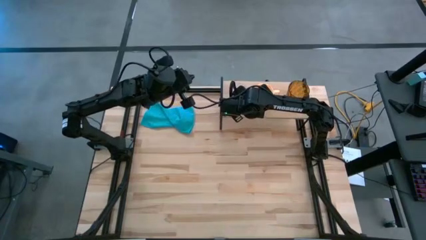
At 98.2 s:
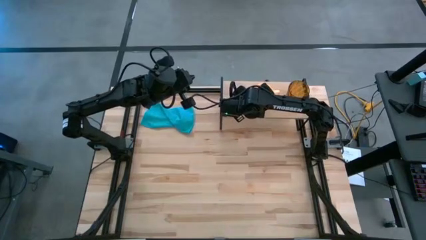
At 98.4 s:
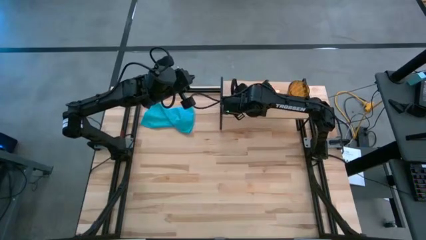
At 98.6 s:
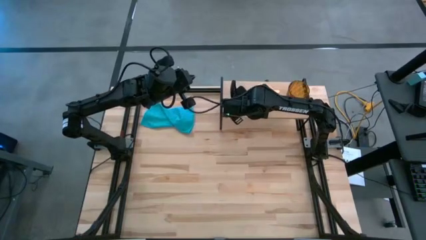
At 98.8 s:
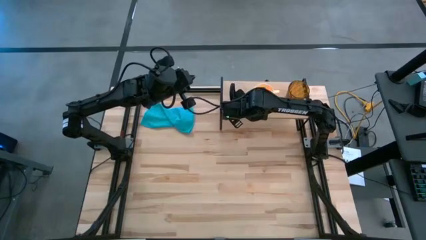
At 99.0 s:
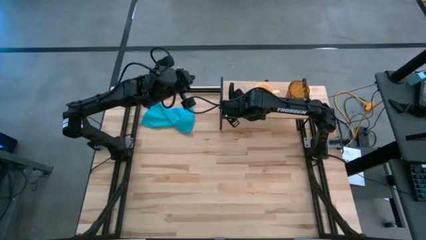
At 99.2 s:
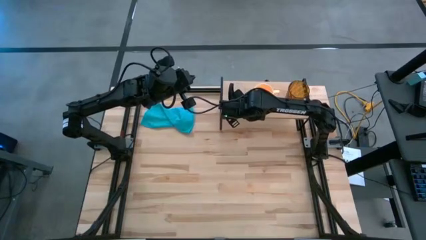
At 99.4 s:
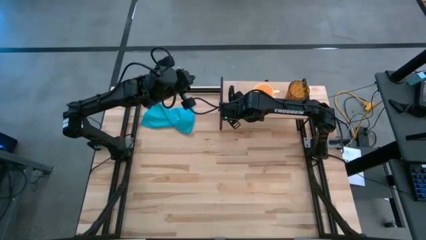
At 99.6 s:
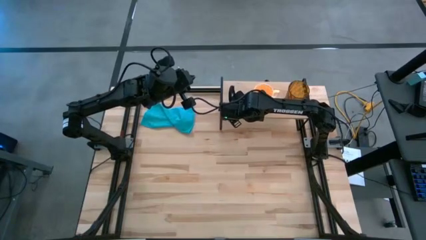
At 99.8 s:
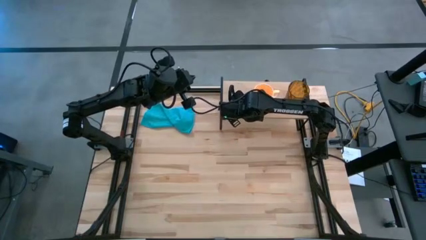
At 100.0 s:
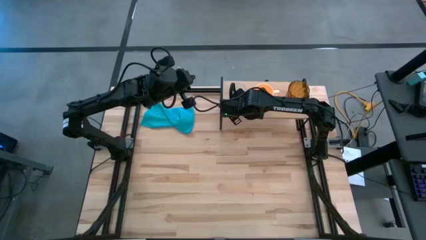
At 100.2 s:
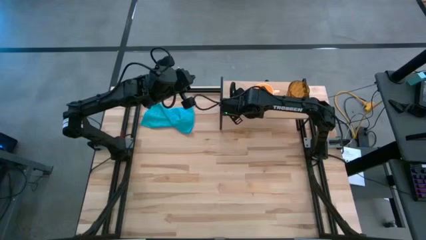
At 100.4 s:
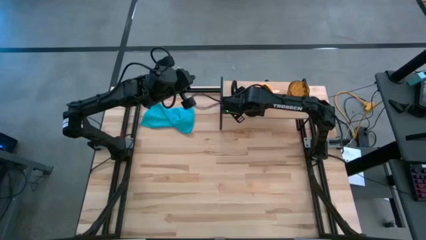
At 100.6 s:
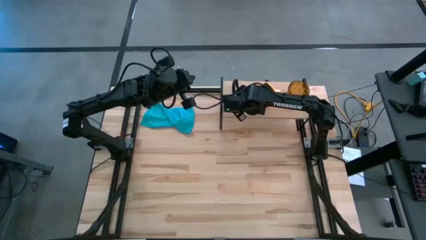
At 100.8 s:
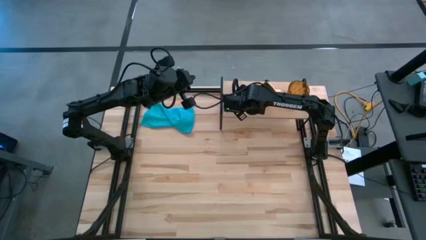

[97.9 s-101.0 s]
Task: Stack small to large cups/mugs on shelf
Adjust the yellow mug on the shelf

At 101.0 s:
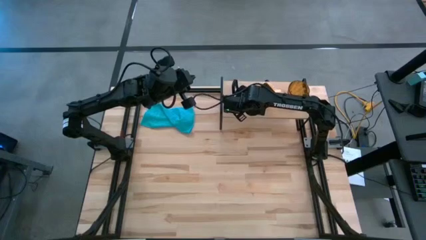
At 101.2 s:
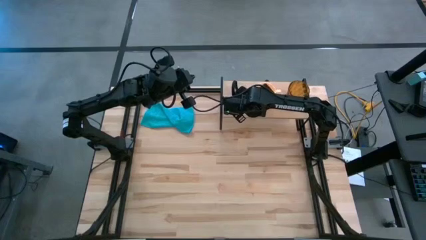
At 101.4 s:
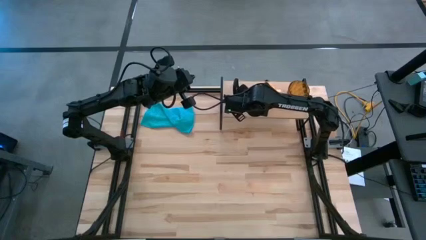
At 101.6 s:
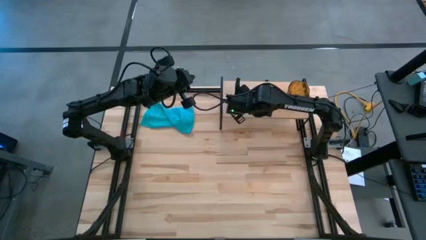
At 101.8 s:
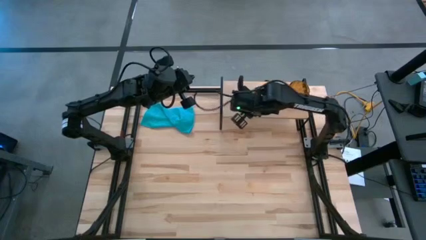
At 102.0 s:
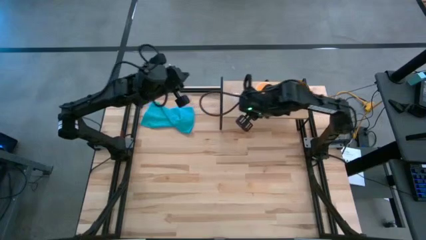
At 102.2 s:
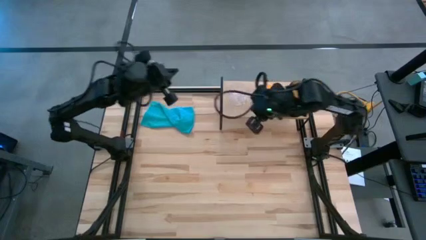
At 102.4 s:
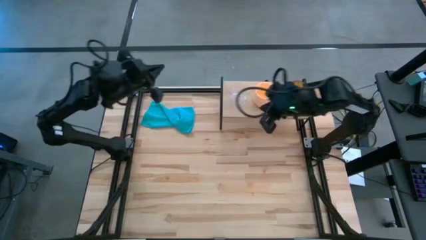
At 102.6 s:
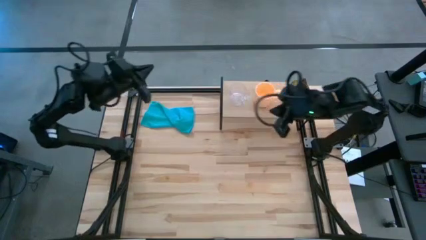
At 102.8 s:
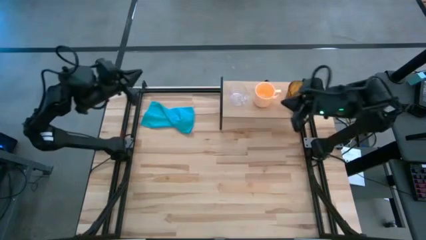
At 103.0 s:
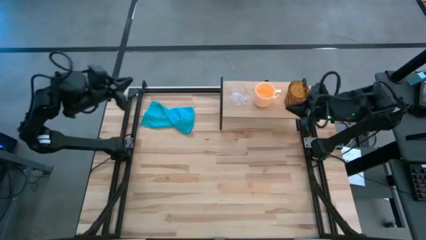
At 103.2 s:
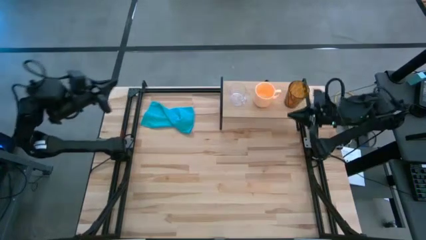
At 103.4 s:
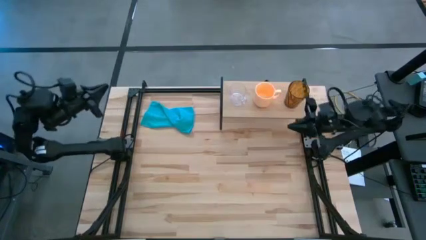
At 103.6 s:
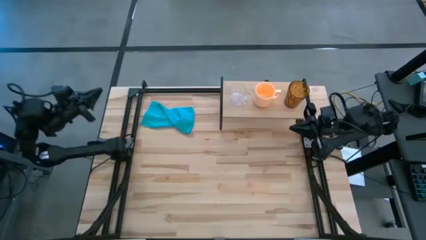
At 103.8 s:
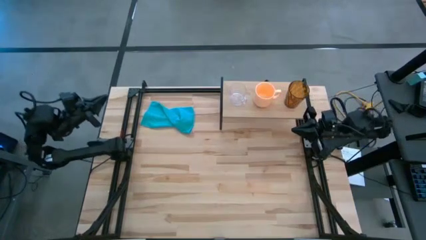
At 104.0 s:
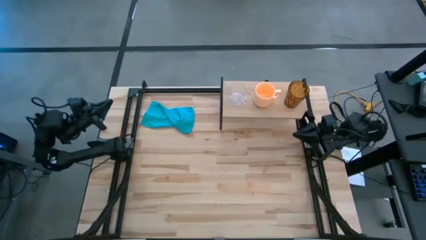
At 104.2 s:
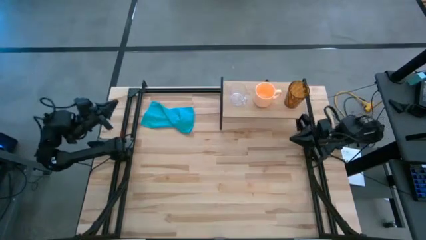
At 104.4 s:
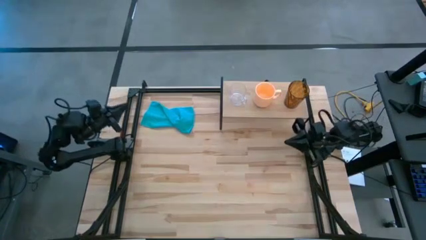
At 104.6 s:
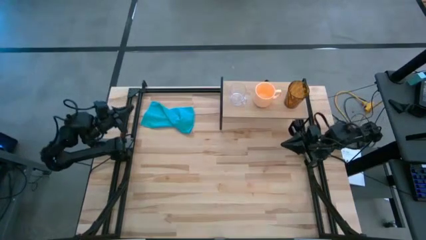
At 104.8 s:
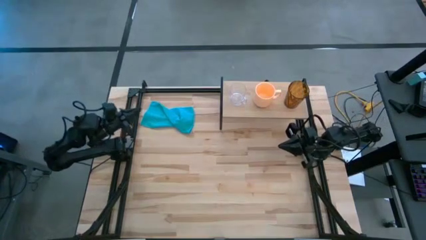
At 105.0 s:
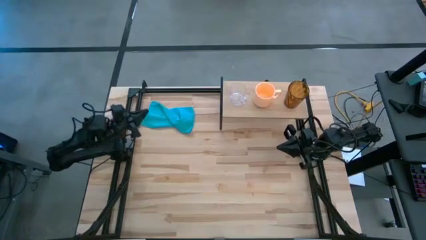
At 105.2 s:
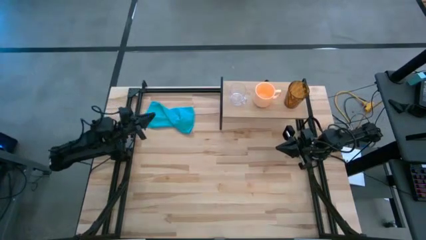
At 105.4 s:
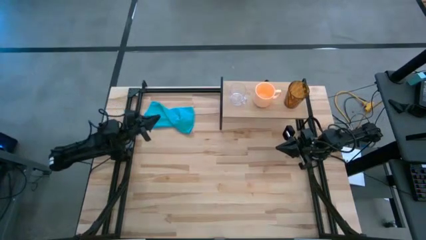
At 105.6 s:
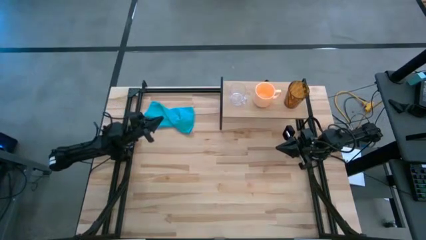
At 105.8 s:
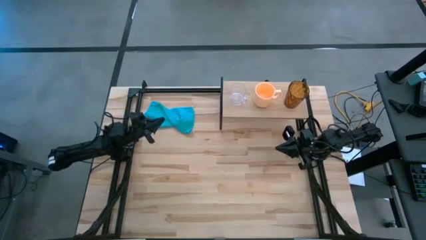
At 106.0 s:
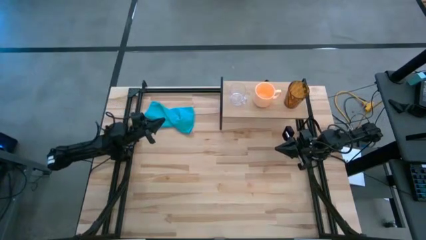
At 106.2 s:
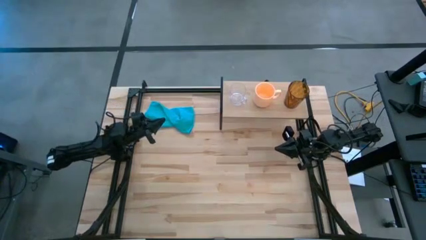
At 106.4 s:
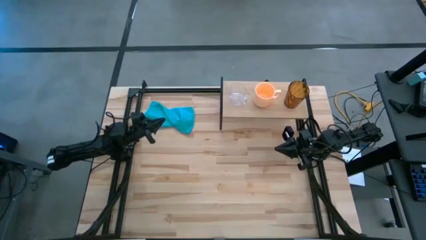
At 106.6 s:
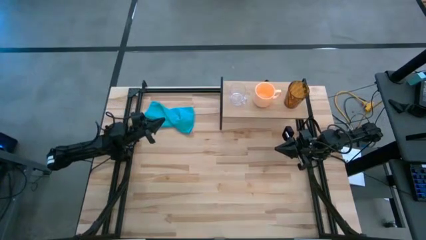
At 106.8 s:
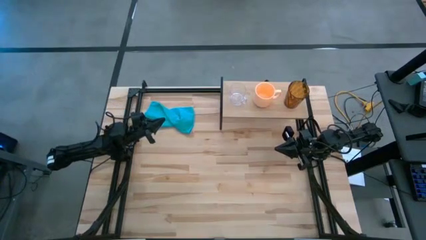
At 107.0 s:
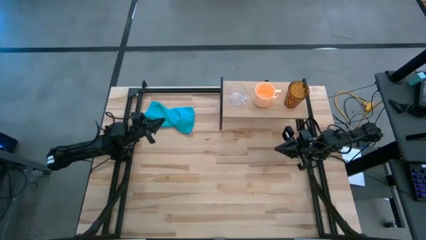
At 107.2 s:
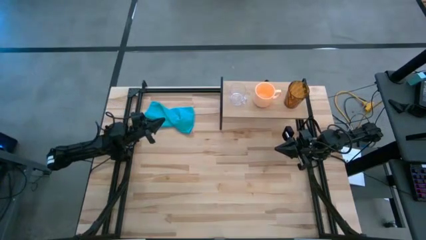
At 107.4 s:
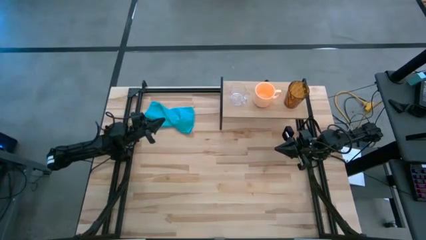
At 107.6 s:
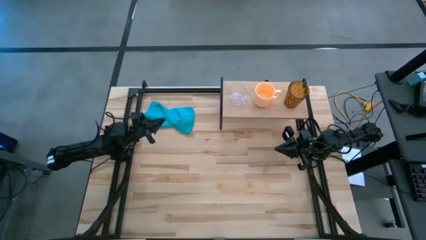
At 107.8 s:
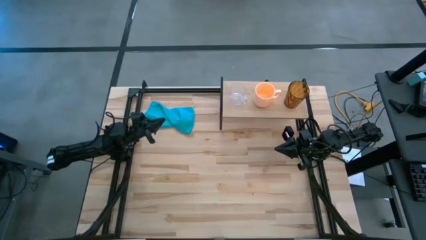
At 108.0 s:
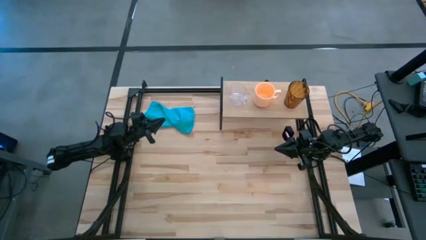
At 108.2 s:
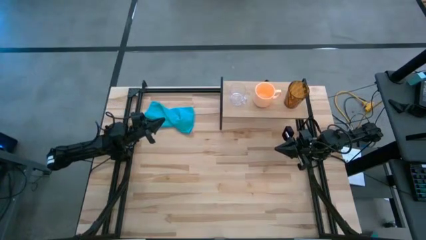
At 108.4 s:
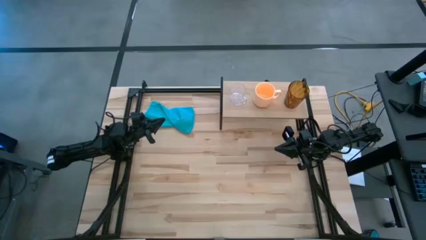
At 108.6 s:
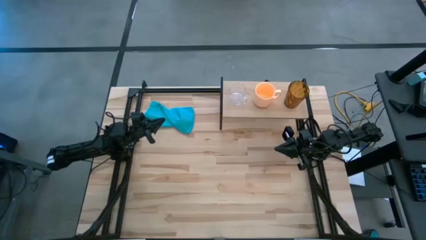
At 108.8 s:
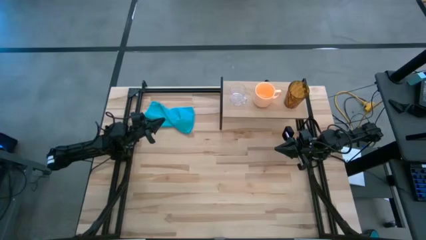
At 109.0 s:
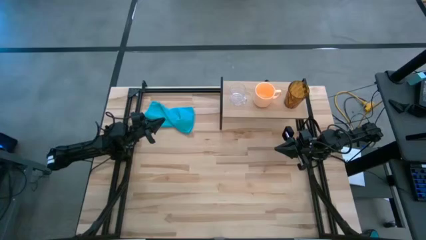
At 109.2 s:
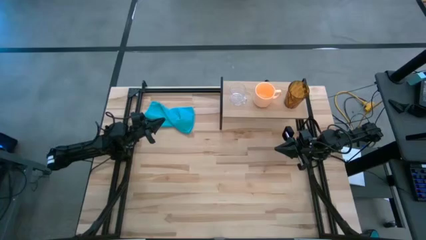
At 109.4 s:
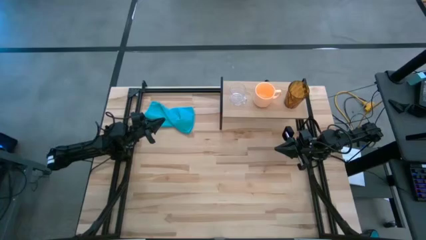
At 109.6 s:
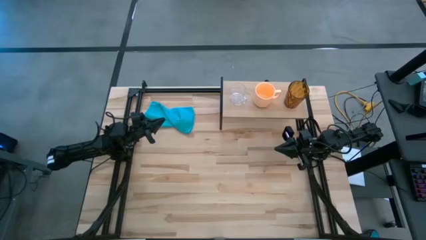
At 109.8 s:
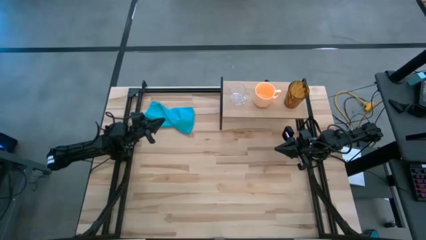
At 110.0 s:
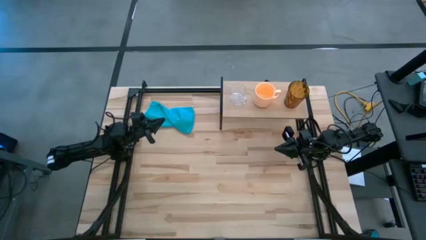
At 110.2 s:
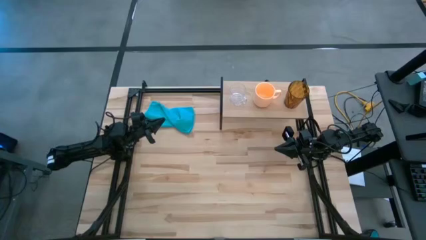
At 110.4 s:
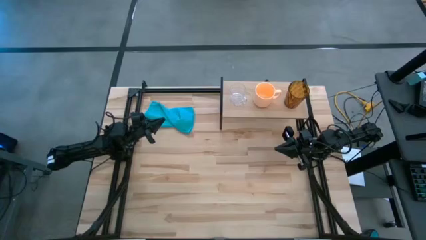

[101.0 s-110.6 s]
Return to Home Position

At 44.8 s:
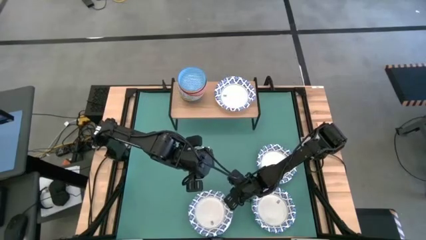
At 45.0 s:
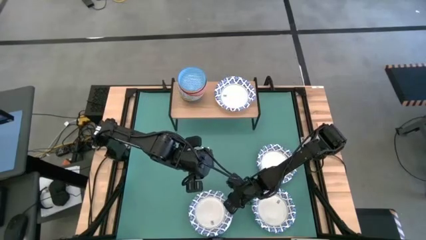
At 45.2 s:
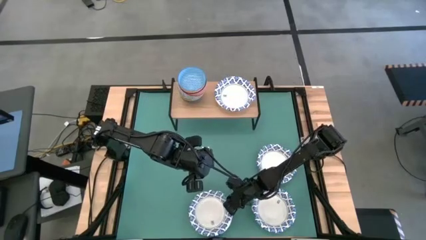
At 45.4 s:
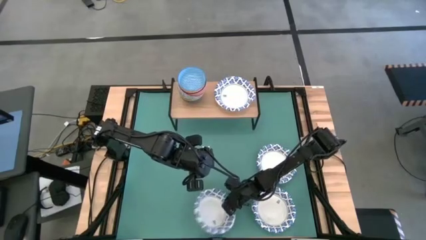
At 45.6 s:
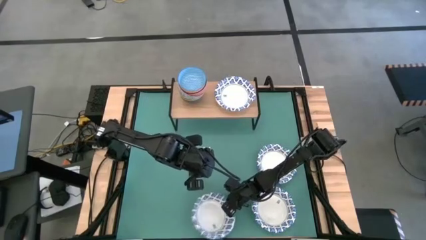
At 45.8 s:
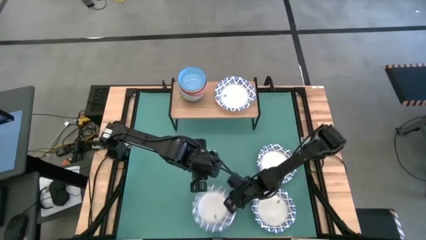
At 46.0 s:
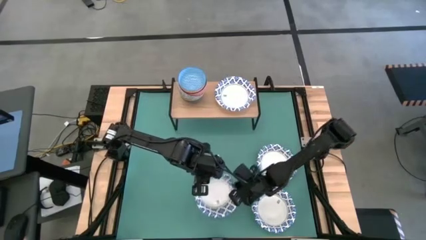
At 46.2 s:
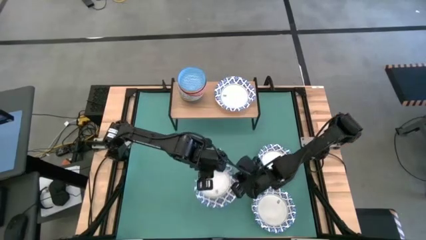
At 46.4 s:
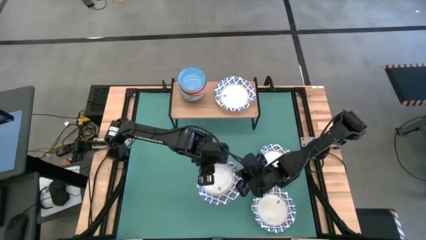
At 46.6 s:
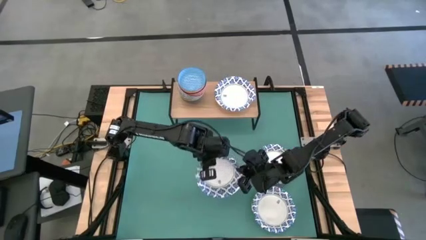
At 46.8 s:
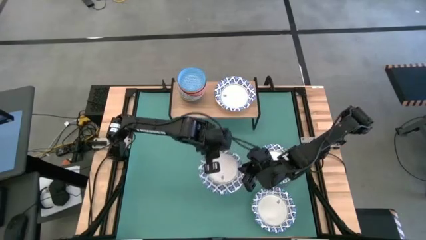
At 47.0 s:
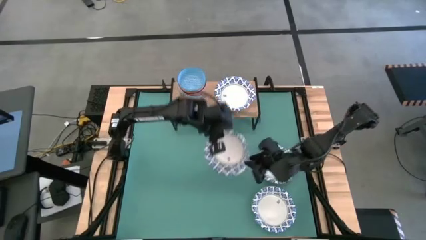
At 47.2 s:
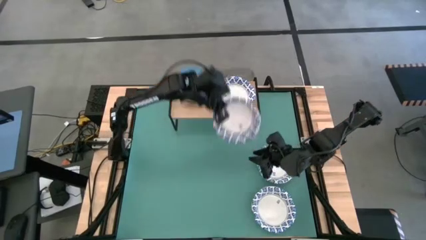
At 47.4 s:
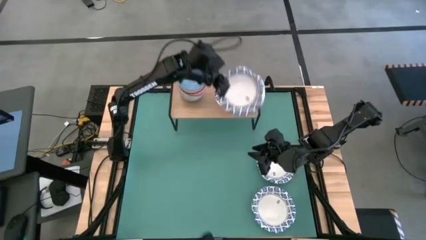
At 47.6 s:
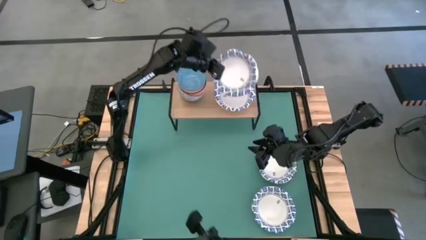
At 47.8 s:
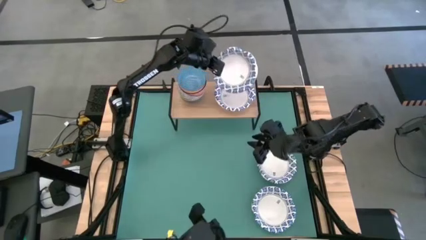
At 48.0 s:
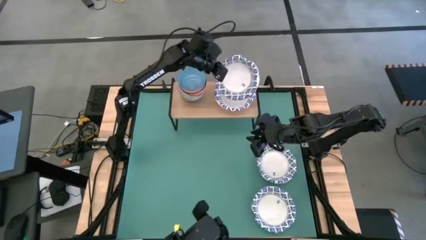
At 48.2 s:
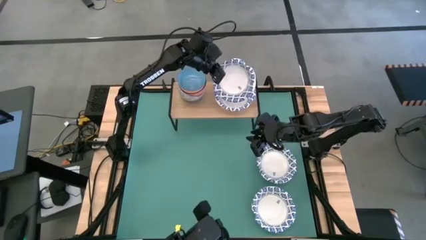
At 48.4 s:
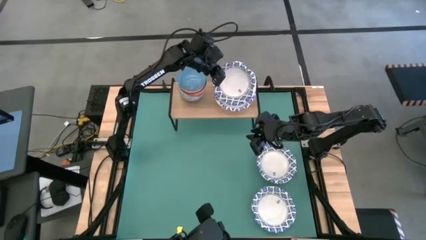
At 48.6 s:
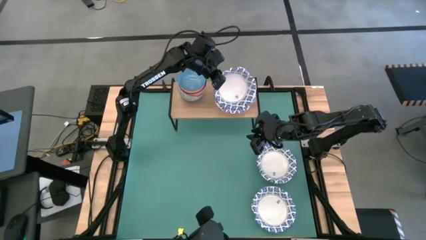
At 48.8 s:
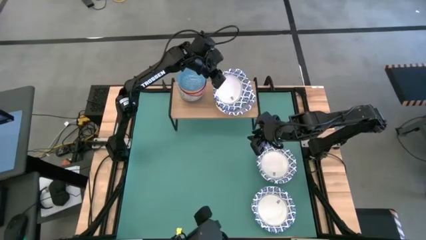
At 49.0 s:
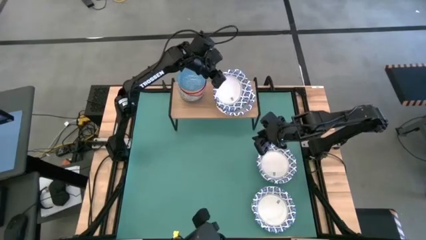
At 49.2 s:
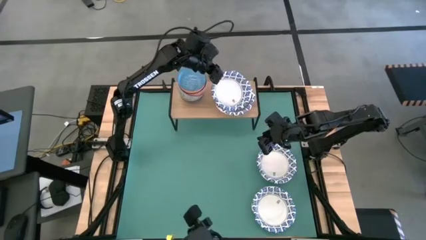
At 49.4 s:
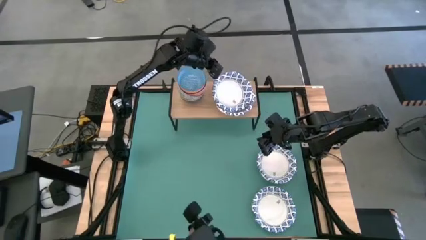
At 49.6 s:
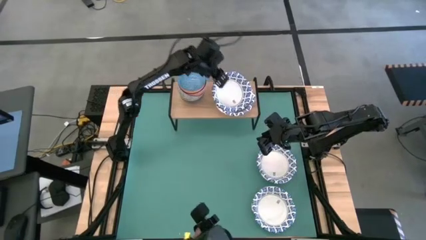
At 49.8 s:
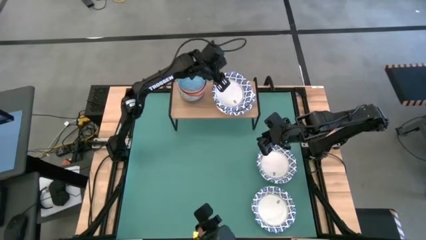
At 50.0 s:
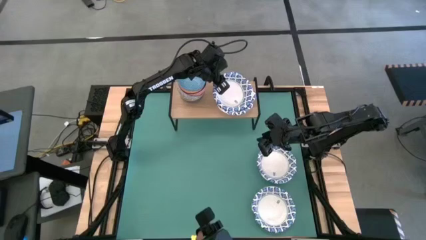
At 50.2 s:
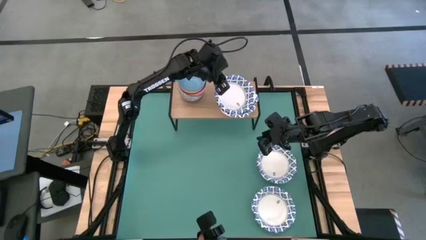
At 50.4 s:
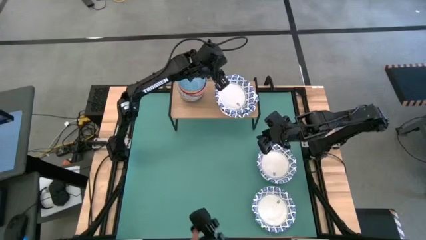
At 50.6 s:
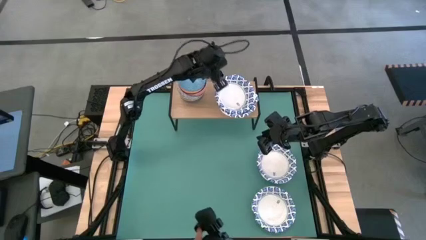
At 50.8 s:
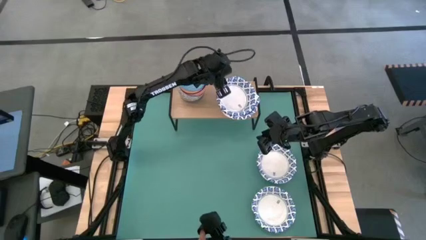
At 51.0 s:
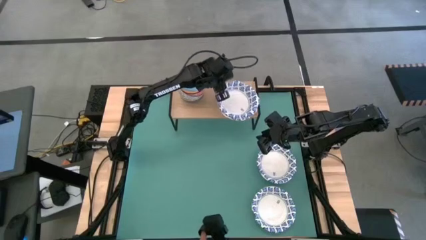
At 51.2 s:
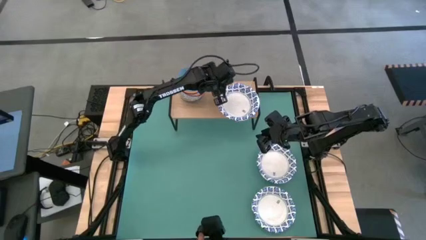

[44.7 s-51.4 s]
Task: Place and stack bowls onto a shelf
Stack the white bowl on top of the white bowl on the shelf
